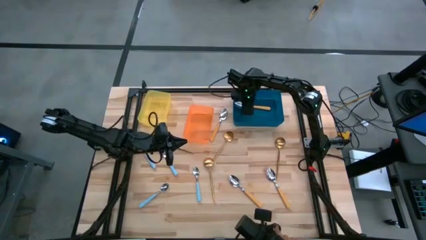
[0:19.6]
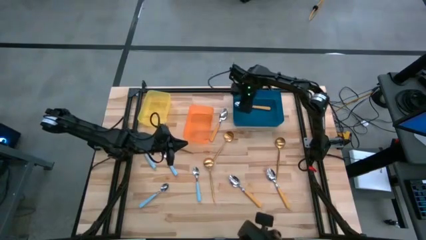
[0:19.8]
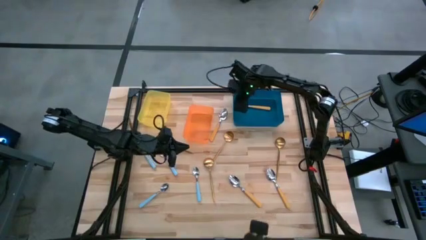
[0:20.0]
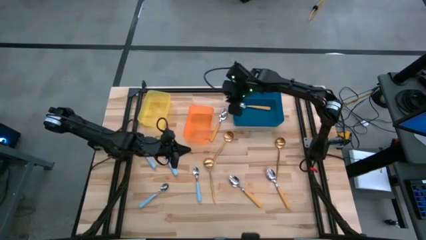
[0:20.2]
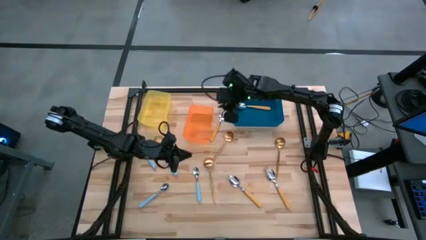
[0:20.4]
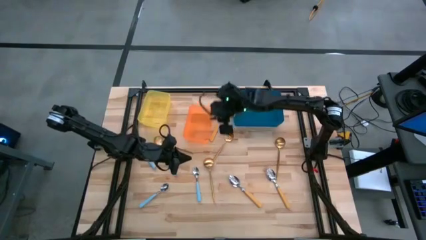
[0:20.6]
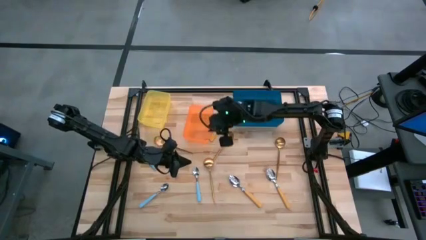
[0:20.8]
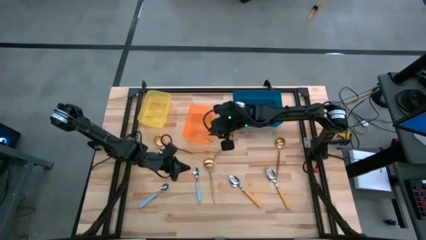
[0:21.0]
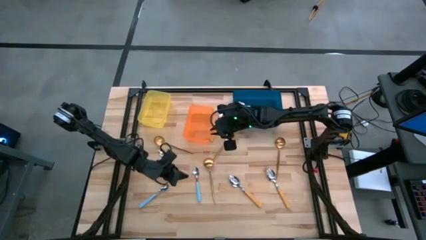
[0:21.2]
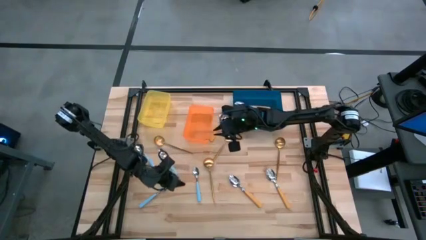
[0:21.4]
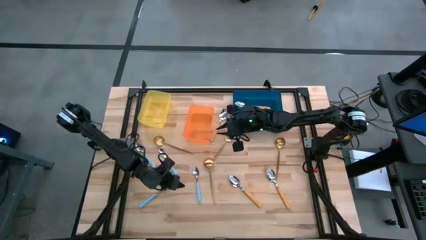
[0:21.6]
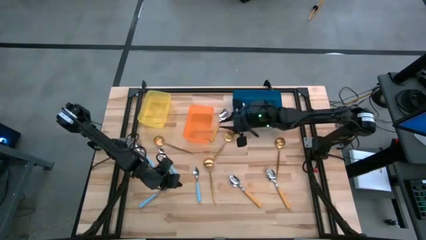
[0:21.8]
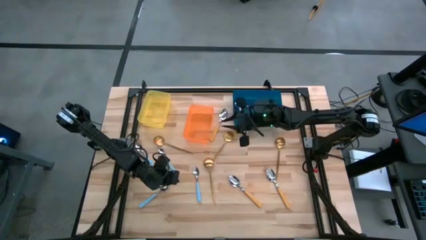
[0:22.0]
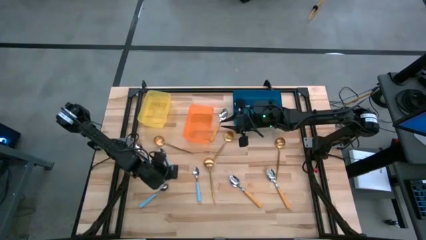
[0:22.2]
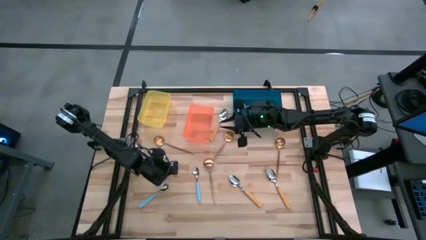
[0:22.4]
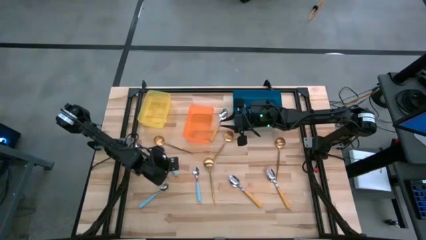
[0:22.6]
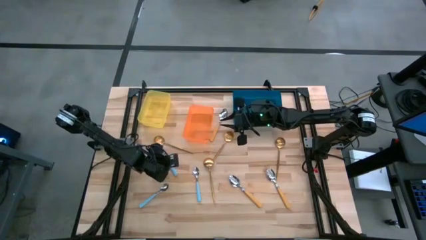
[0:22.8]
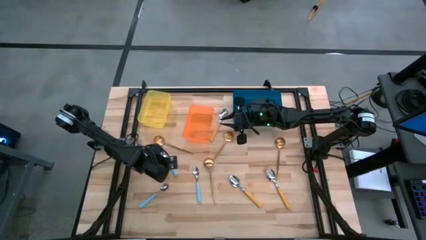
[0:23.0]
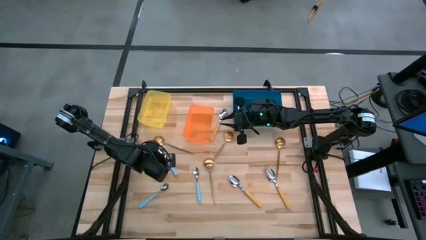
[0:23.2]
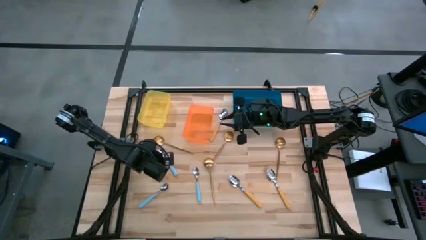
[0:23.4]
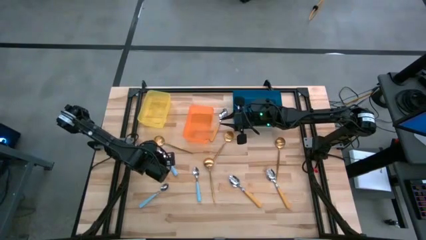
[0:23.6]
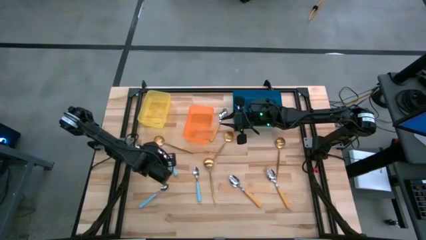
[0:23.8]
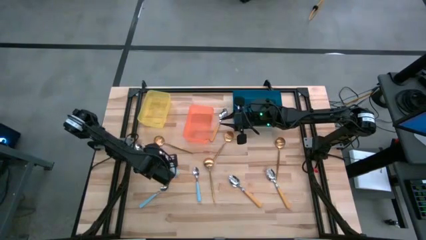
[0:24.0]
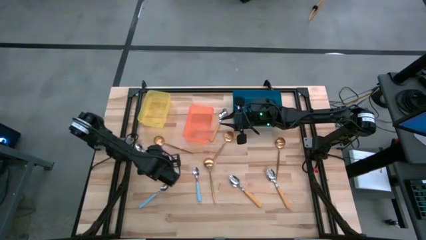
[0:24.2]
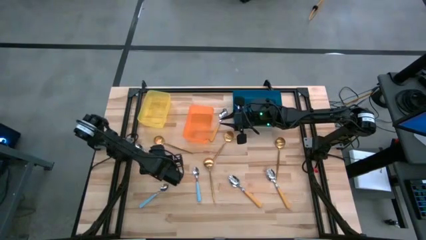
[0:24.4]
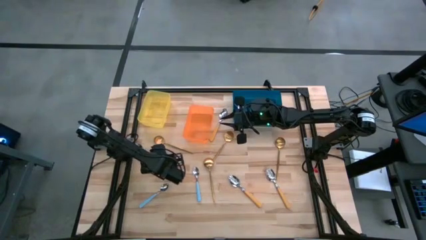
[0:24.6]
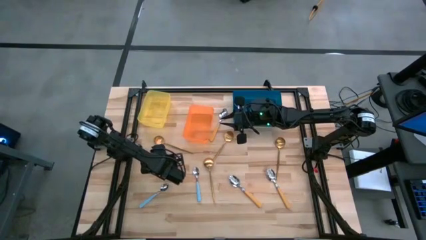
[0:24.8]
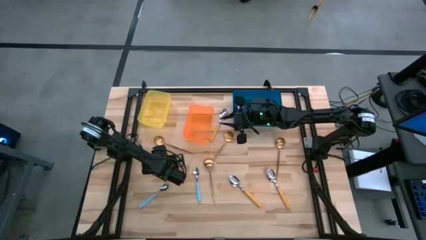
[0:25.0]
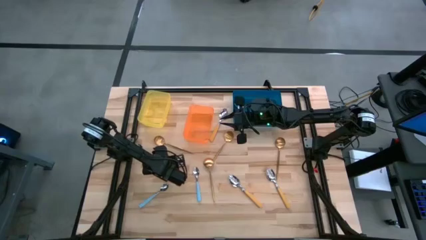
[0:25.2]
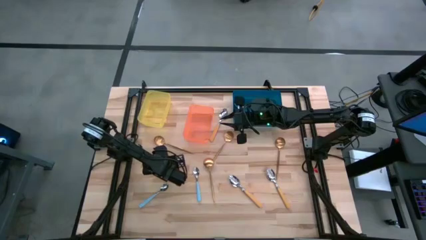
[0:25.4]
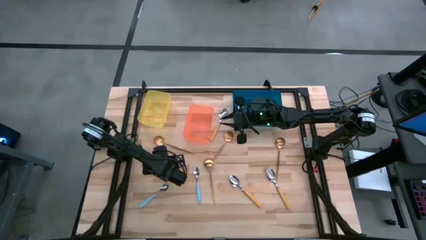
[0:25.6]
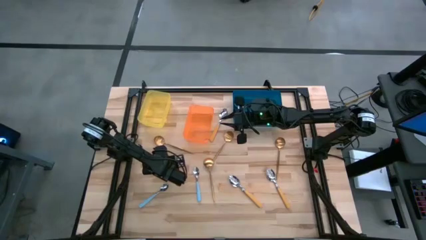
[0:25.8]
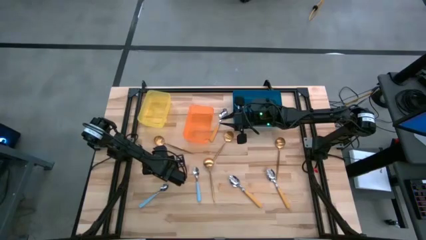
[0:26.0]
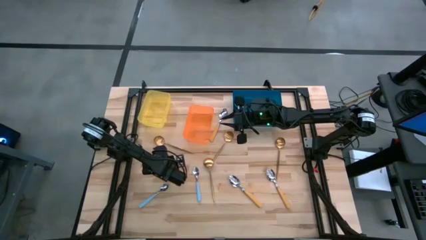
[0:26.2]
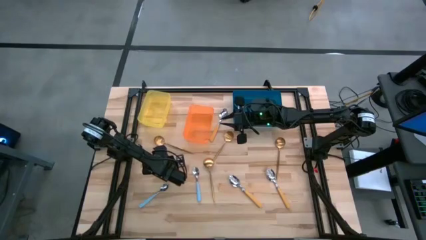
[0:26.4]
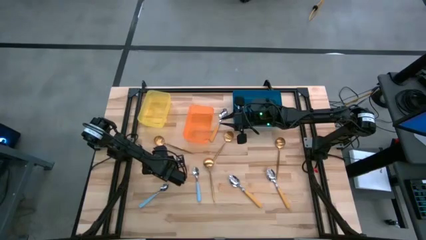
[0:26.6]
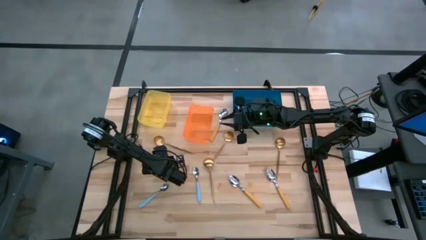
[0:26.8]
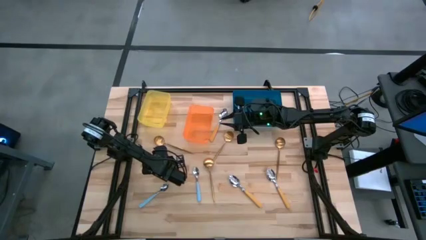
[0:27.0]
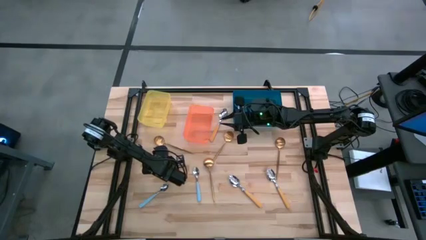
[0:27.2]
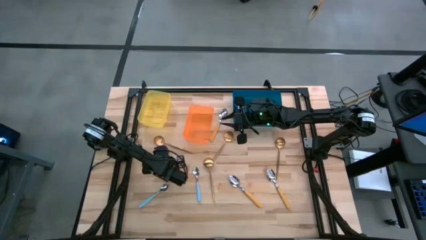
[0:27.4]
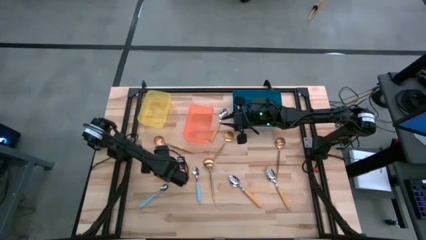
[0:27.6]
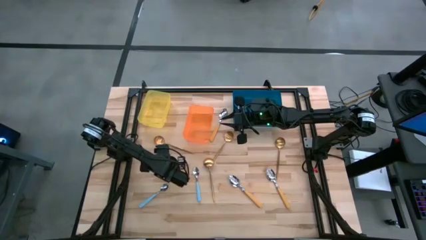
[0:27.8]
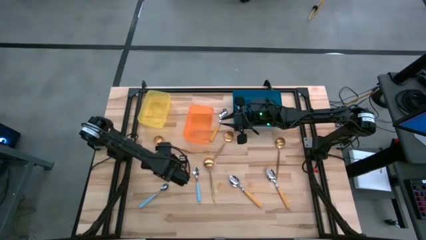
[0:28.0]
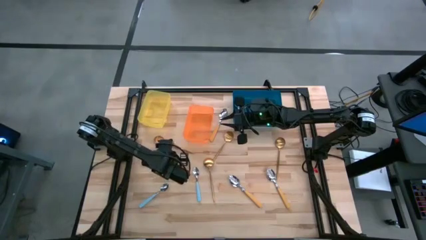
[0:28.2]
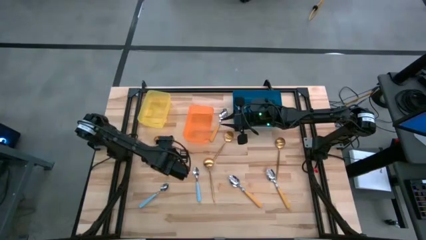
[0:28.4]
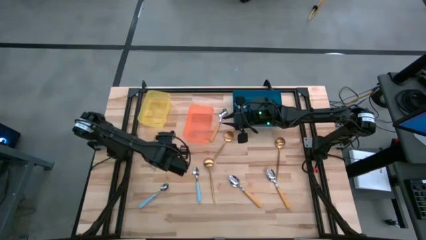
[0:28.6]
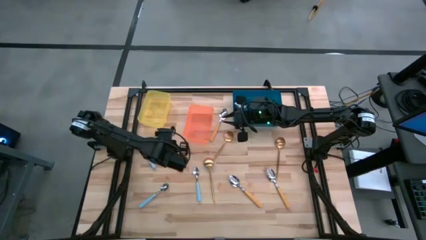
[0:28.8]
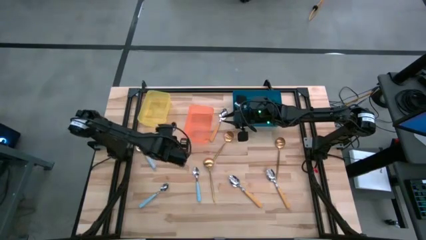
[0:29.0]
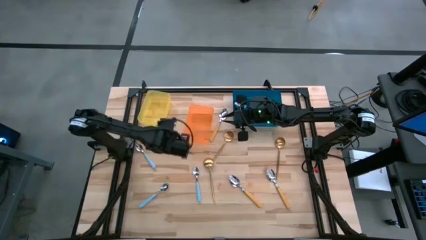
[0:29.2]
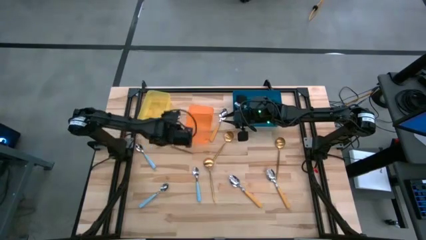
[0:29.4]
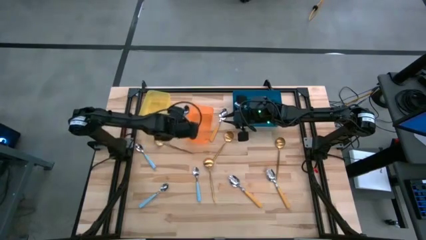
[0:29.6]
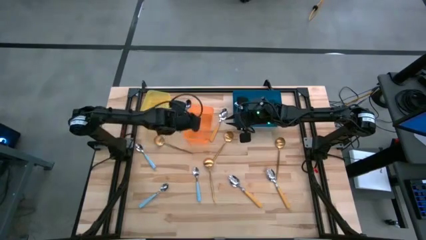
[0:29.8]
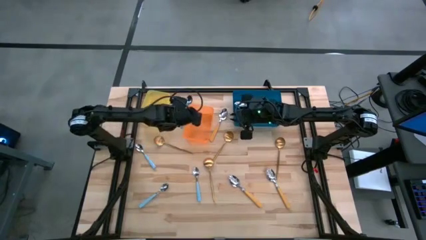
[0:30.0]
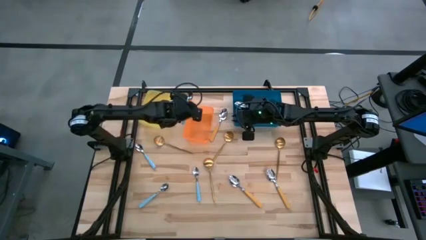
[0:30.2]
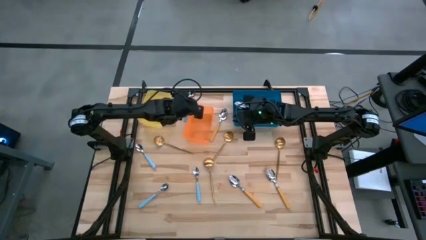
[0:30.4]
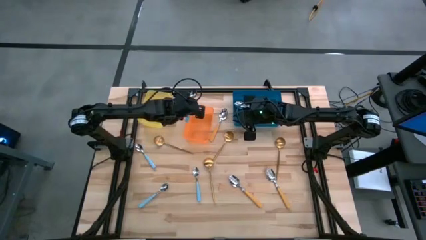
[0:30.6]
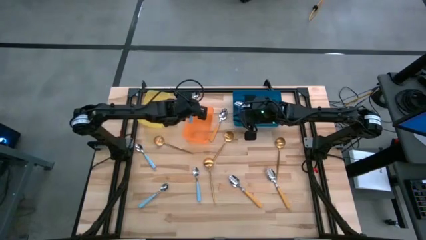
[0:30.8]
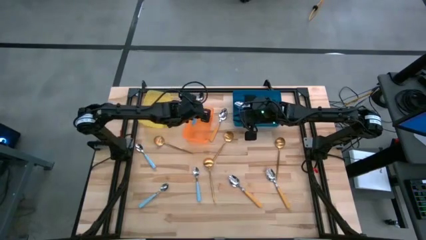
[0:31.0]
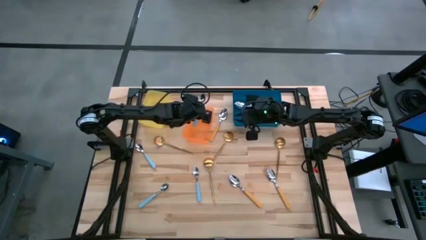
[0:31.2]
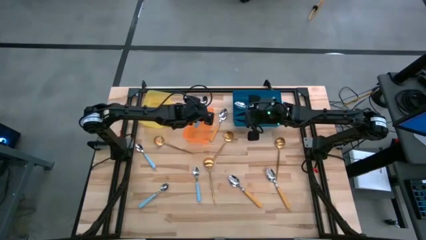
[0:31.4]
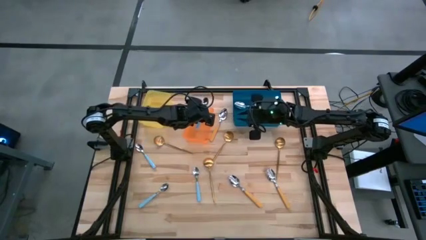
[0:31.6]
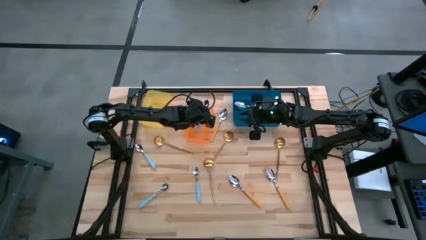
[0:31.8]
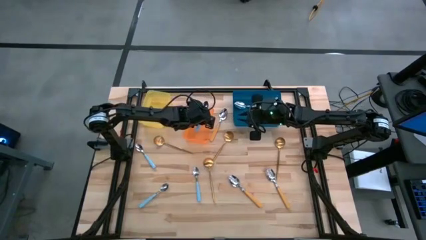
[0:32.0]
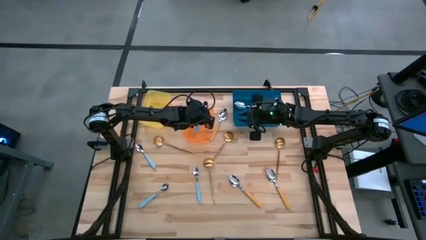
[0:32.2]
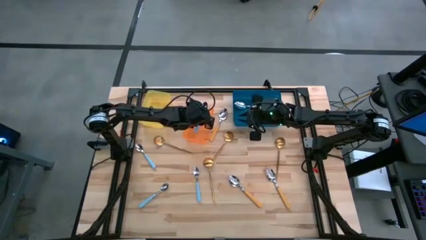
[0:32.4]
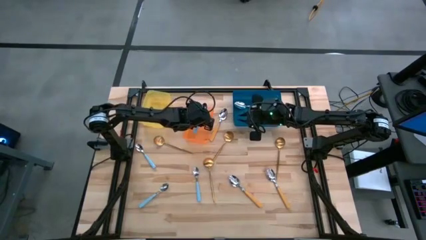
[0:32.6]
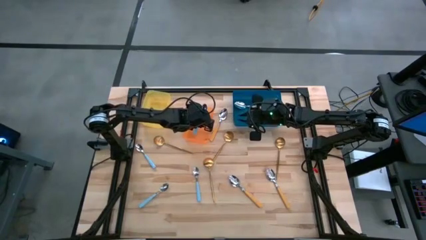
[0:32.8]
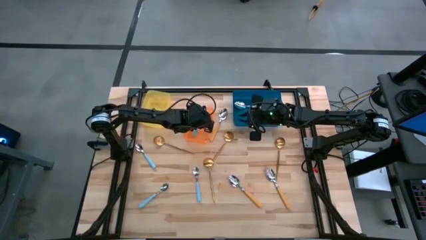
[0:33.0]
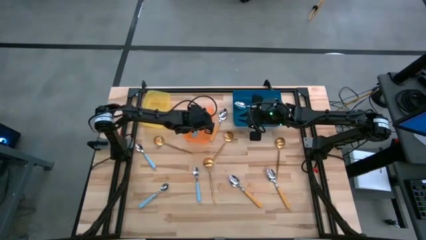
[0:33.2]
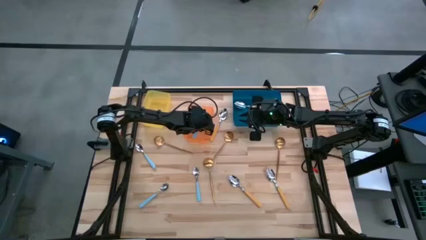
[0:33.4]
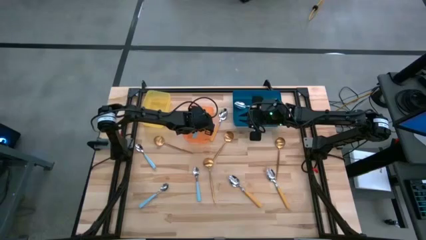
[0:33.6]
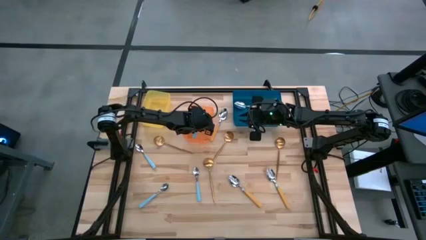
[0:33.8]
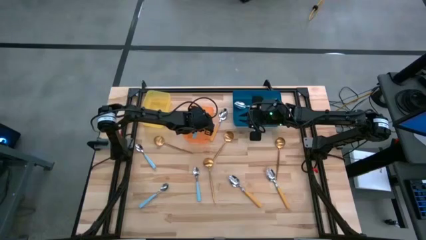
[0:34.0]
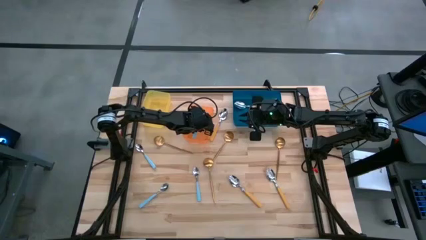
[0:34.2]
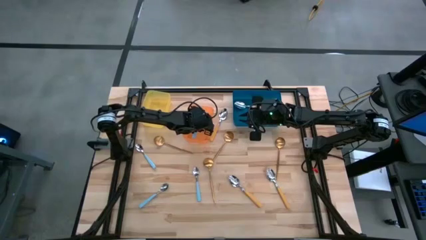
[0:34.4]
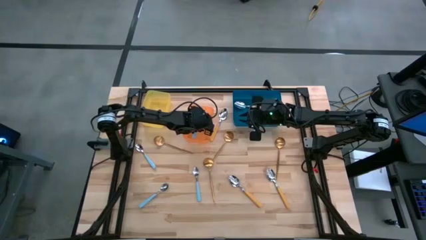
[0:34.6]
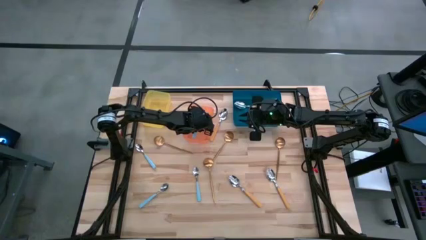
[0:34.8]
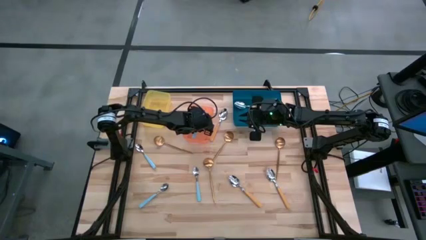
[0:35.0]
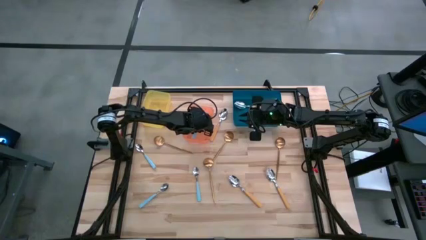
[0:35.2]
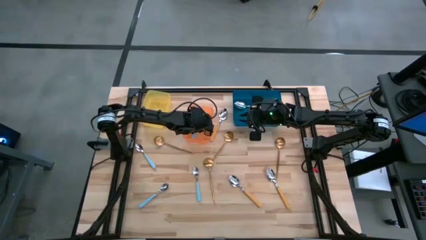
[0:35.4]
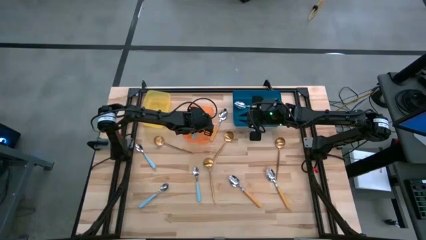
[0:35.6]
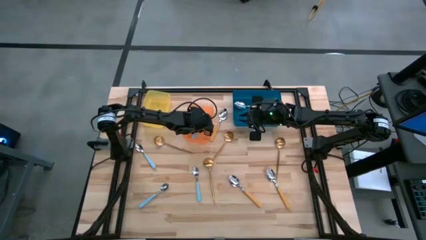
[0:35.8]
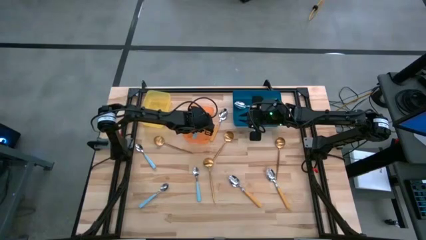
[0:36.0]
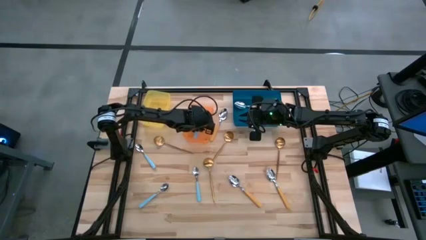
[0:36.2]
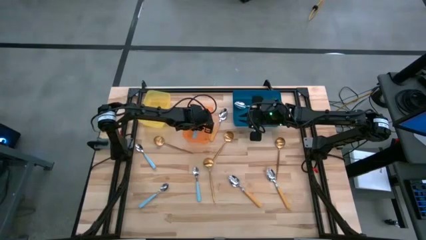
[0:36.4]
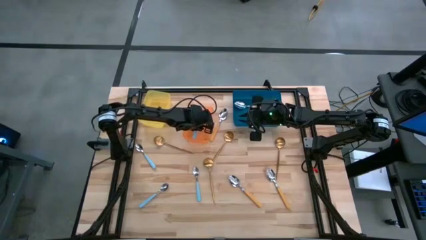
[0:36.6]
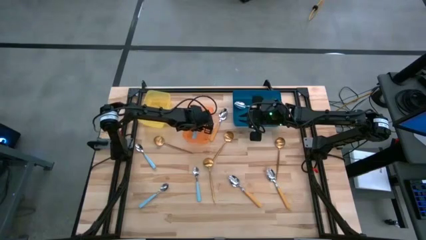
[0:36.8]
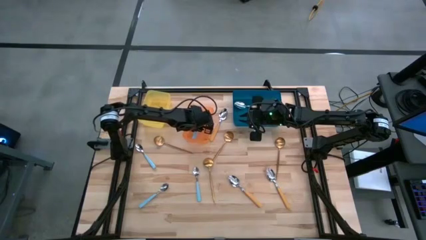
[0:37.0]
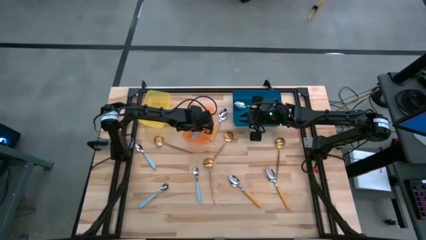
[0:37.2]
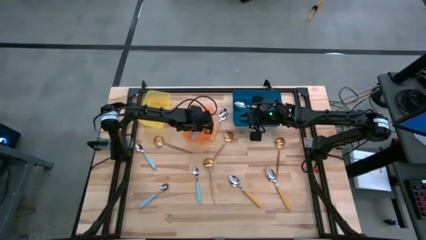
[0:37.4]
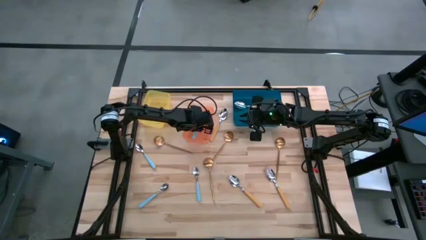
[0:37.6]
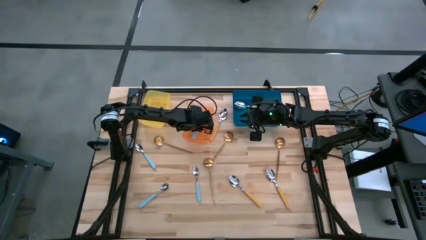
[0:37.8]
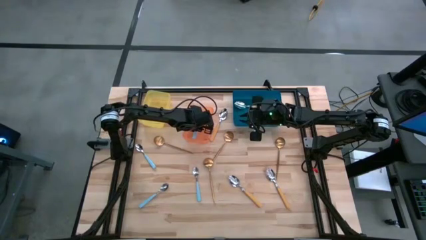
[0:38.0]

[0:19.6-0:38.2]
Task: Sort silverware by color (type)
Put the blue spoon into the orange bin
